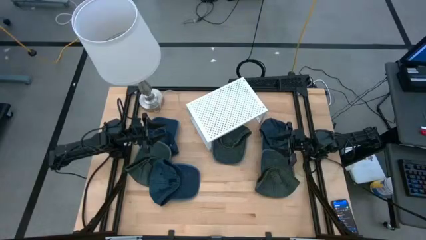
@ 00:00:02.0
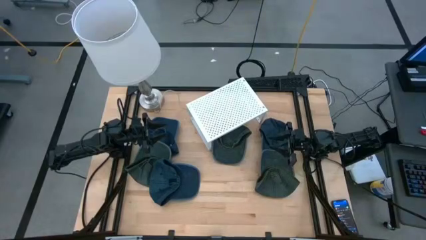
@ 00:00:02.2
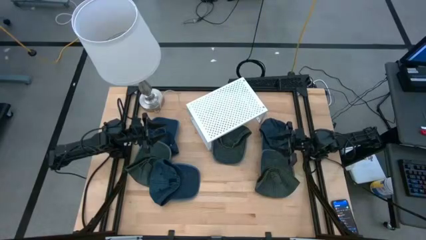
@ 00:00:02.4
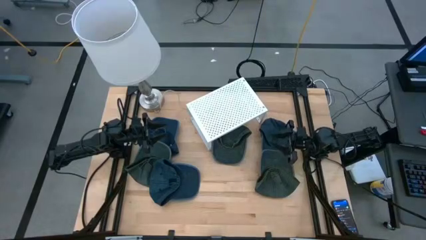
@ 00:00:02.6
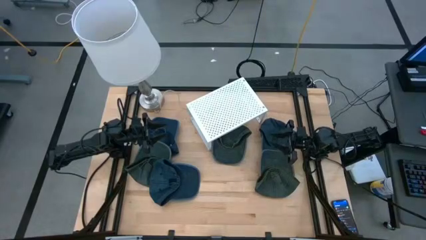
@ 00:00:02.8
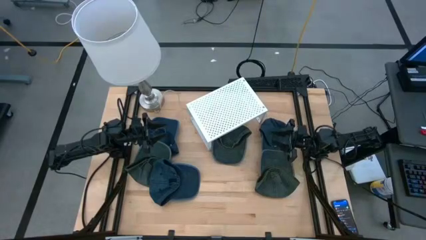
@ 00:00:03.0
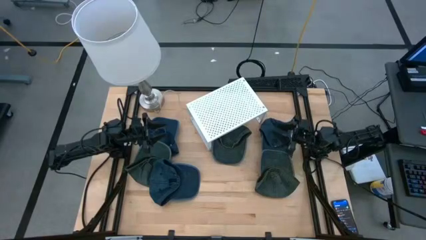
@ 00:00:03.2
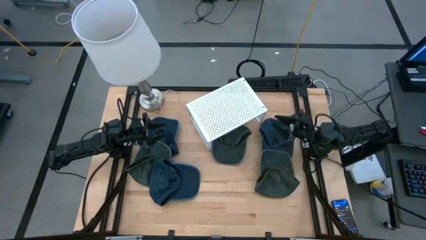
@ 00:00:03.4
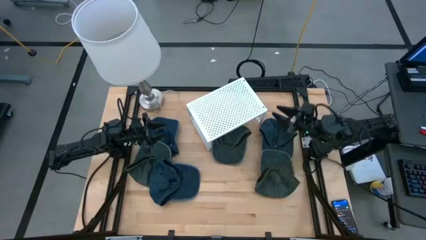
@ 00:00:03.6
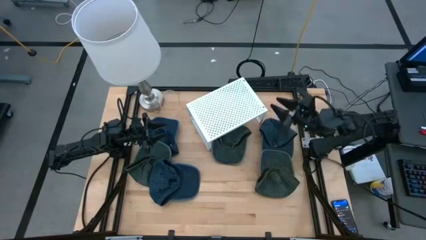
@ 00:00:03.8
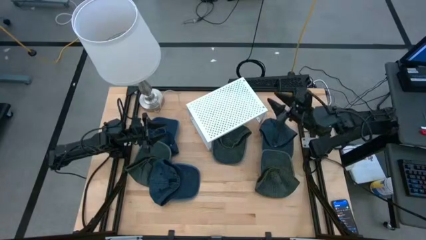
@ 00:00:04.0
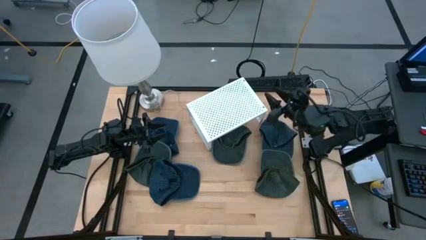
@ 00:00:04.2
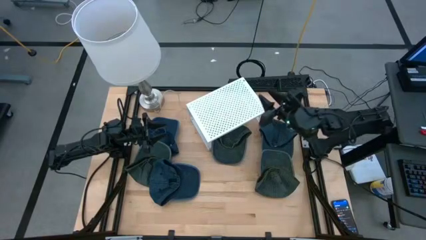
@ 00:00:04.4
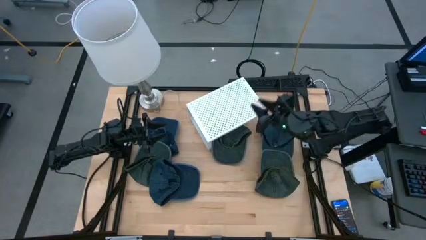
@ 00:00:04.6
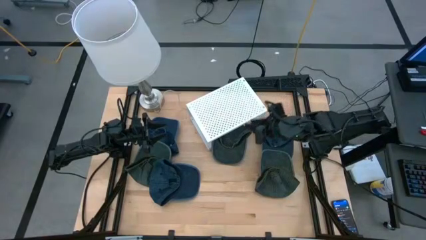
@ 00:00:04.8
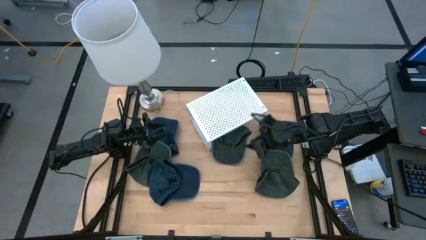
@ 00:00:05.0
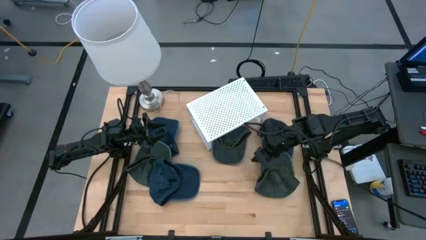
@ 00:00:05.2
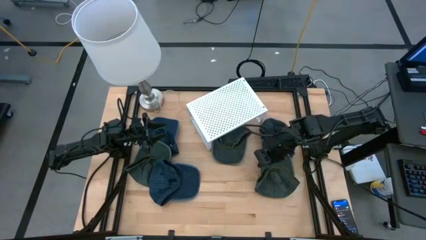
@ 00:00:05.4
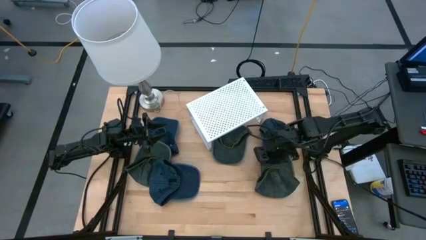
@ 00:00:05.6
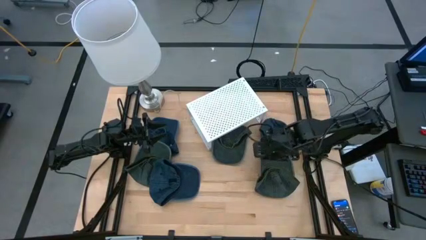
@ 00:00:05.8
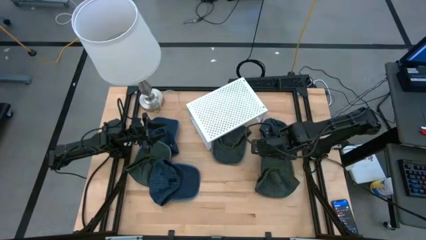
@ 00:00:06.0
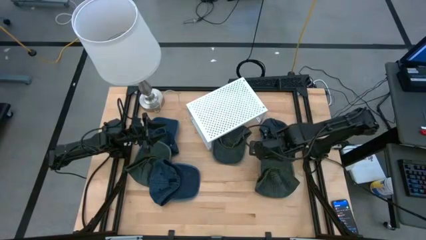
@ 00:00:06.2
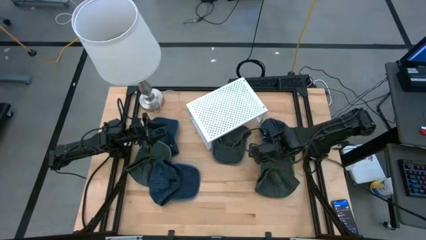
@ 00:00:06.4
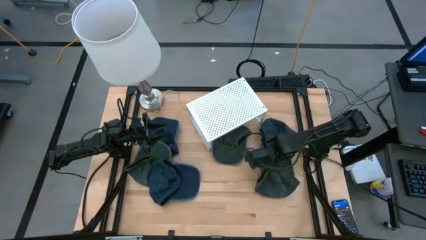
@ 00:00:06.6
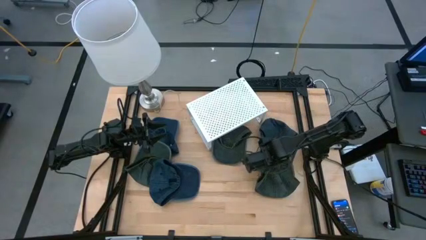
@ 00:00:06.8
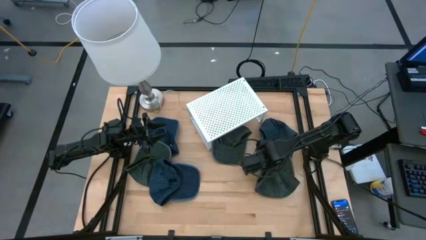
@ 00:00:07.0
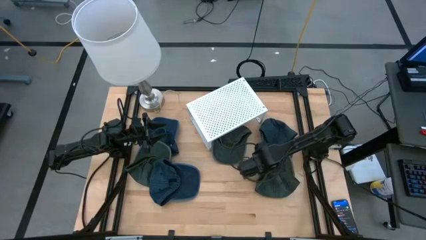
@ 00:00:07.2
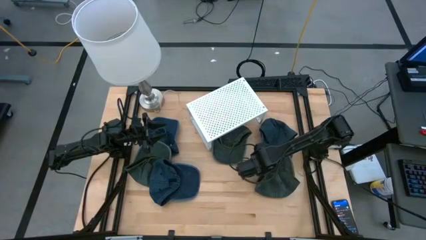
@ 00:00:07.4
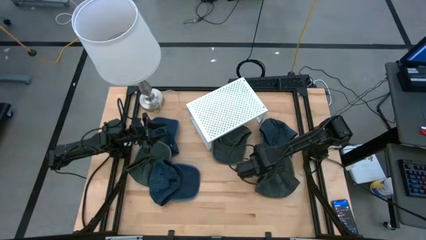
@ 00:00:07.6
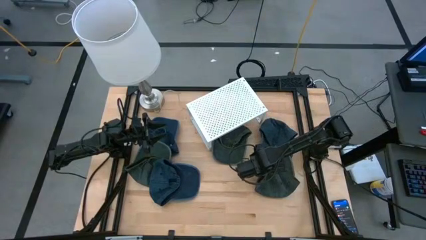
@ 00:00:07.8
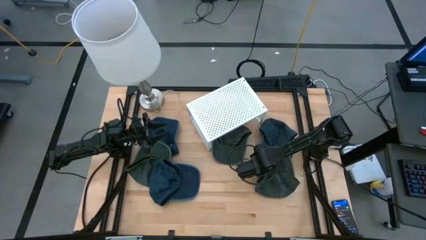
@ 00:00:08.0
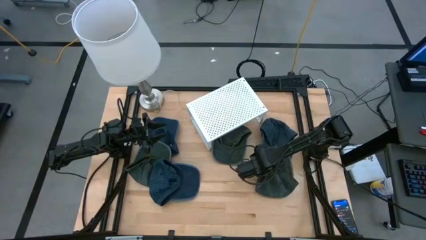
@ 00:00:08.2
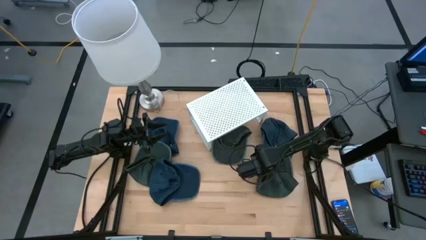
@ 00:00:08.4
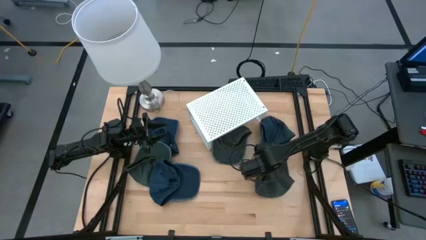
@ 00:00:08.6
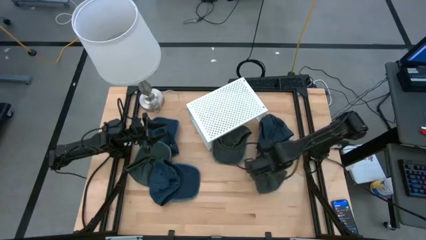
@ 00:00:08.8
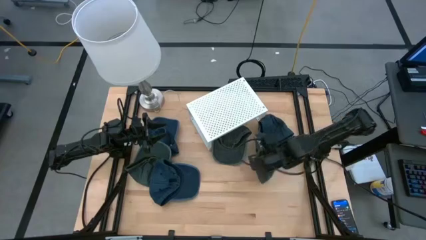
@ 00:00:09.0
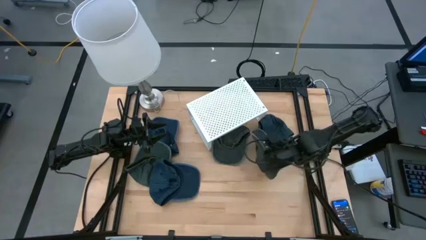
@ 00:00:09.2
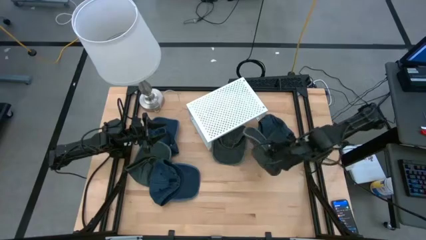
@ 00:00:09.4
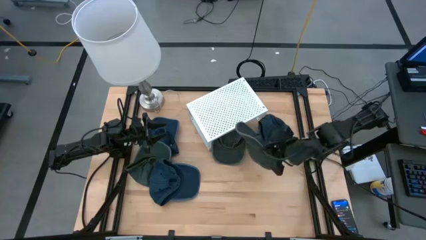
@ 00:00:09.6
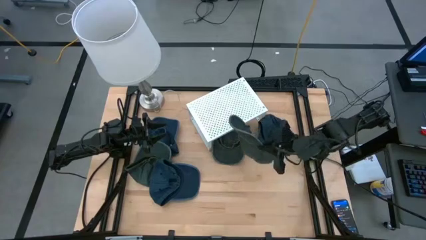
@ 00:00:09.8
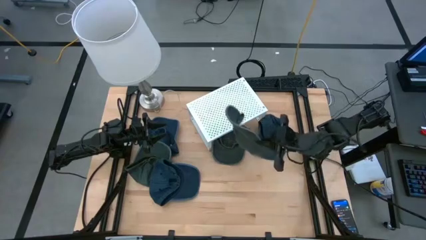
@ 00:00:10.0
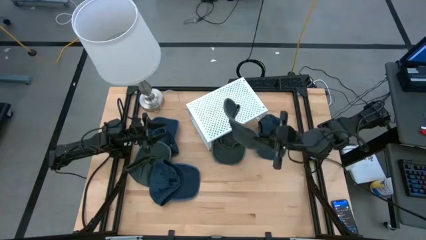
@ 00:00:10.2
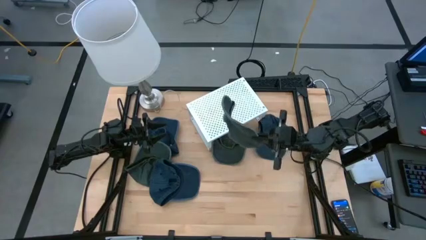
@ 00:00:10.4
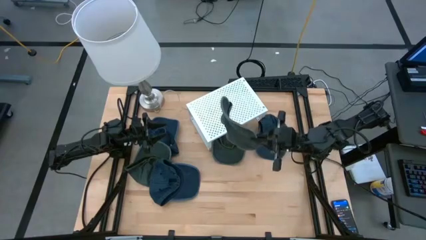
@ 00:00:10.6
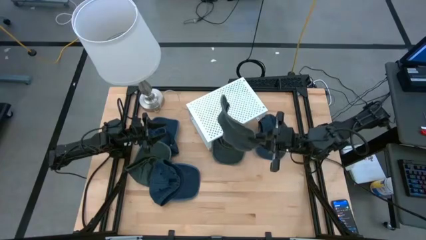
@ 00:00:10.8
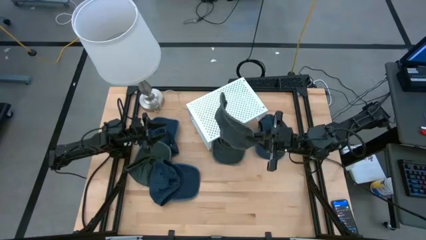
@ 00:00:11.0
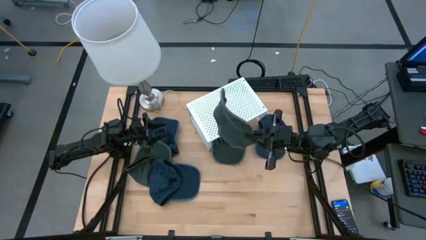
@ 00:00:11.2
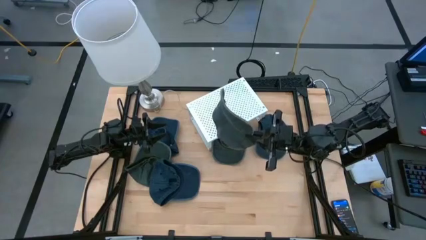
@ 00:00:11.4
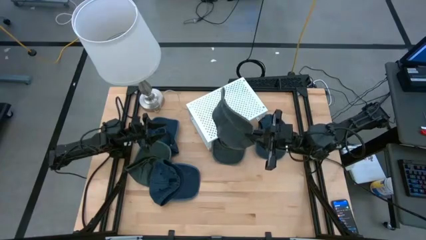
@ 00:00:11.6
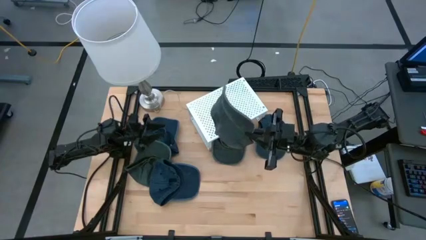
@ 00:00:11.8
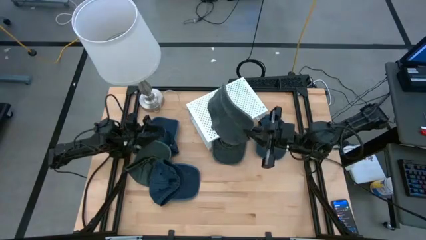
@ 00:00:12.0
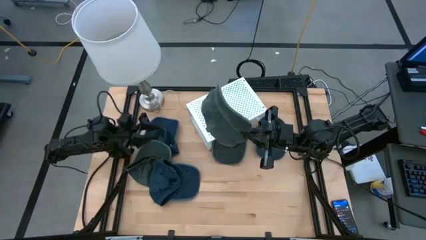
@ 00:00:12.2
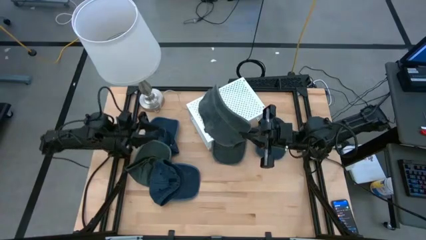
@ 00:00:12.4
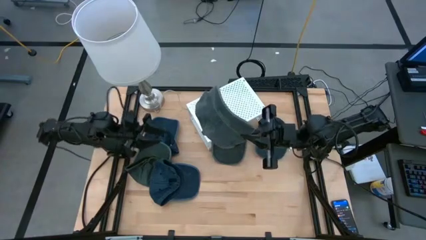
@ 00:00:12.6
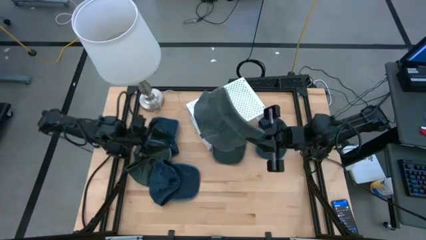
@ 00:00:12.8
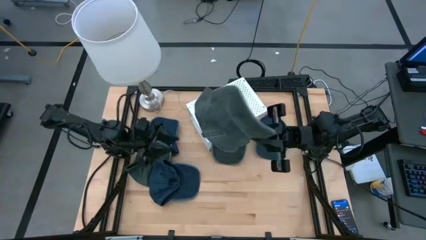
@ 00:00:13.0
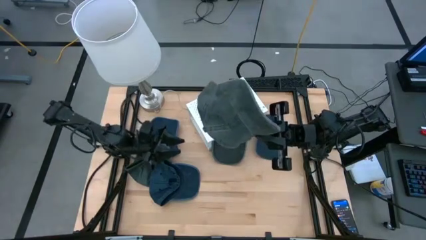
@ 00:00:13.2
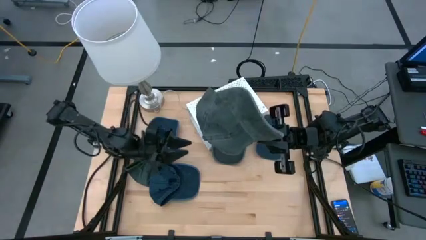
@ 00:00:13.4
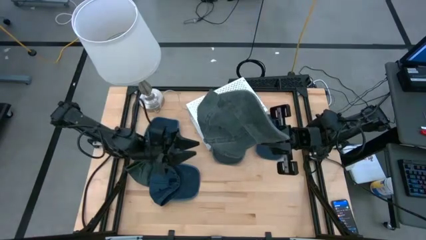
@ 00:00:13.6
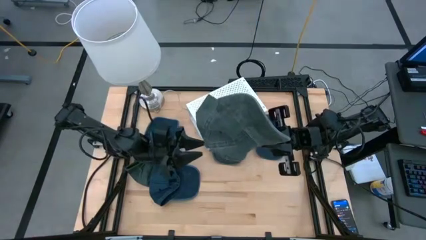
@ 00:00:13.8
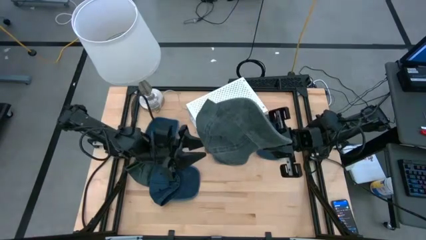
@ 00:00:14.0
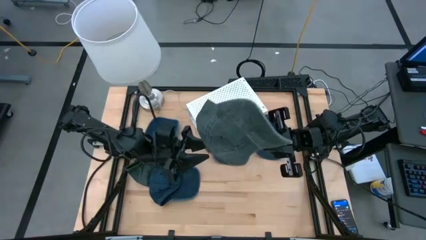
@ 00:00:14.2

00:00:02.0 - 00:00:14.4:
Task: Pick & Place hat
Put the green cap on the shelf
